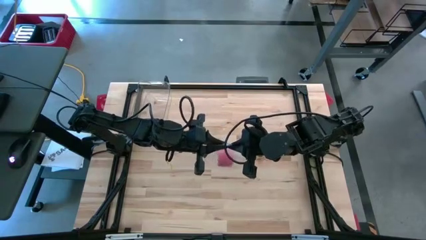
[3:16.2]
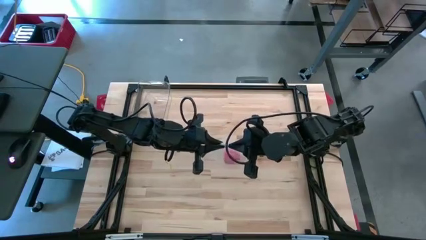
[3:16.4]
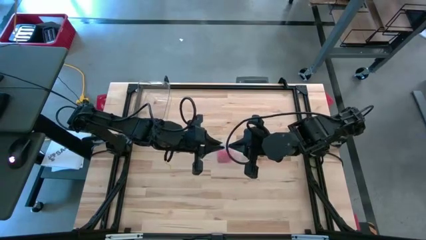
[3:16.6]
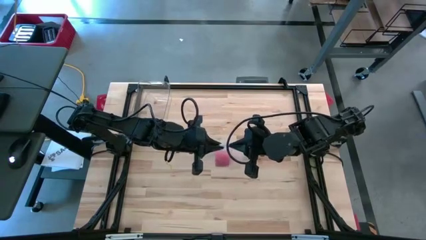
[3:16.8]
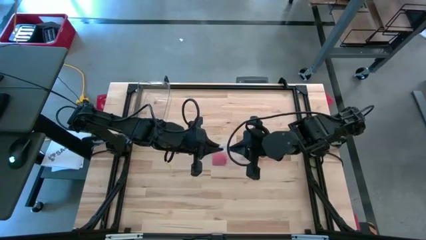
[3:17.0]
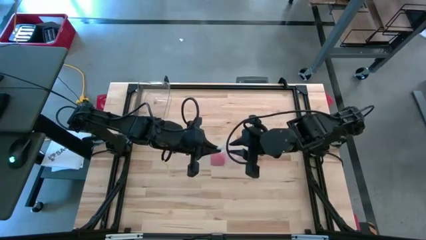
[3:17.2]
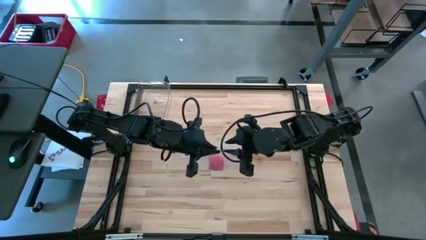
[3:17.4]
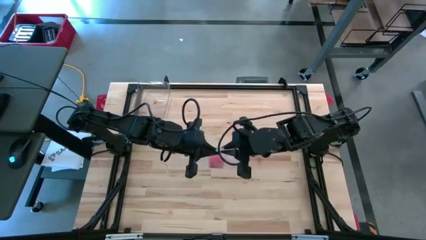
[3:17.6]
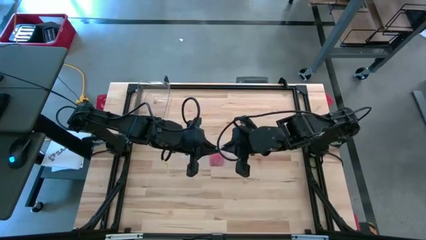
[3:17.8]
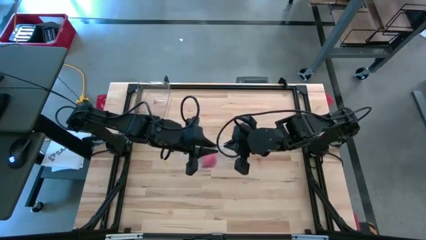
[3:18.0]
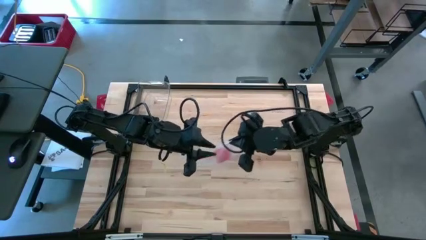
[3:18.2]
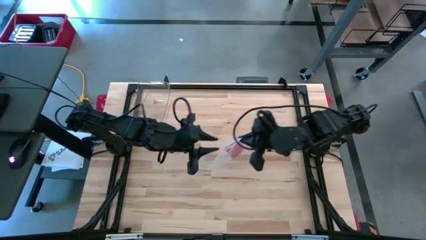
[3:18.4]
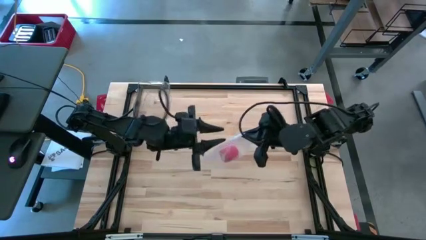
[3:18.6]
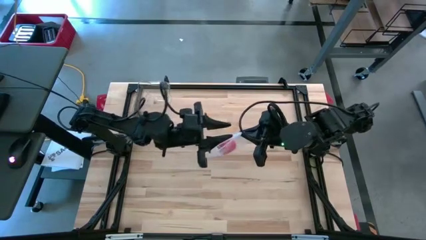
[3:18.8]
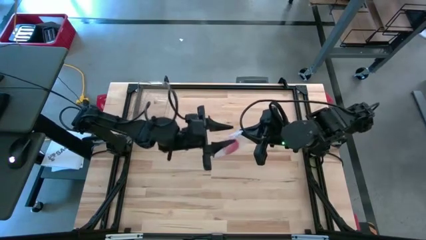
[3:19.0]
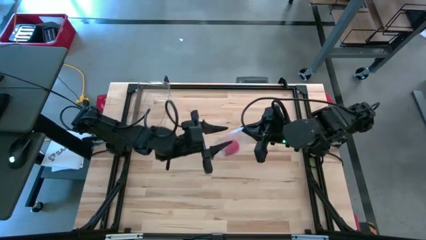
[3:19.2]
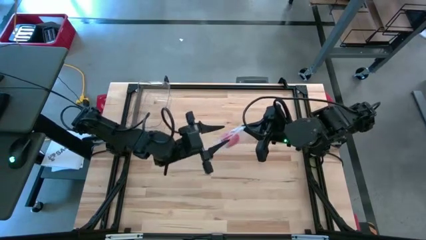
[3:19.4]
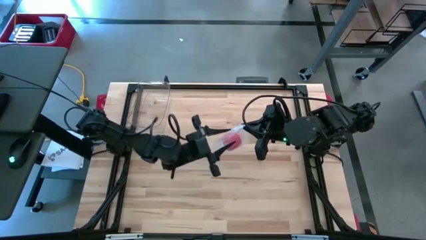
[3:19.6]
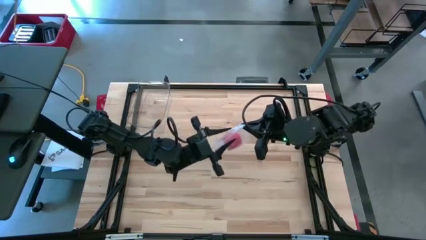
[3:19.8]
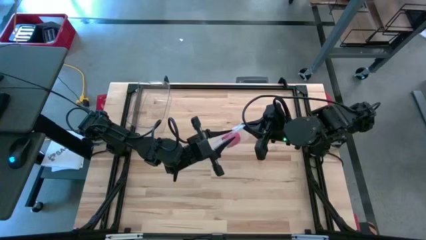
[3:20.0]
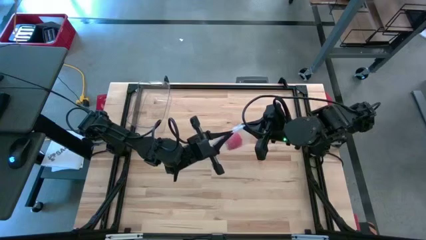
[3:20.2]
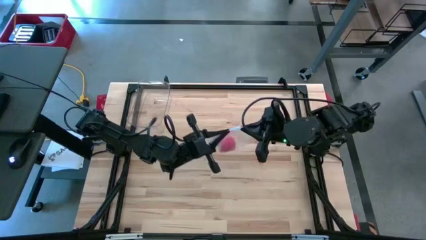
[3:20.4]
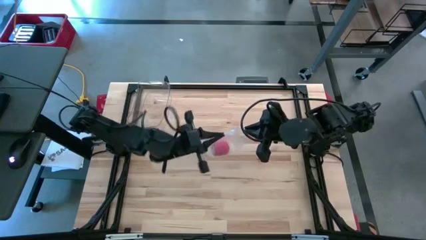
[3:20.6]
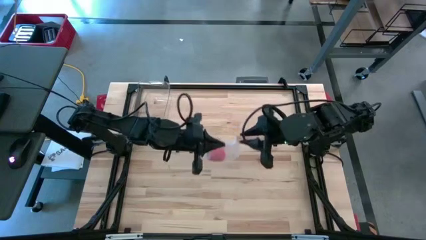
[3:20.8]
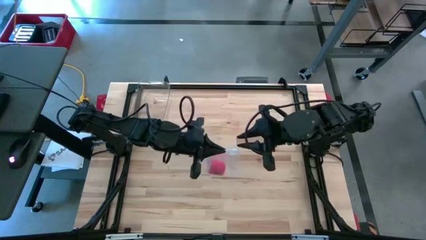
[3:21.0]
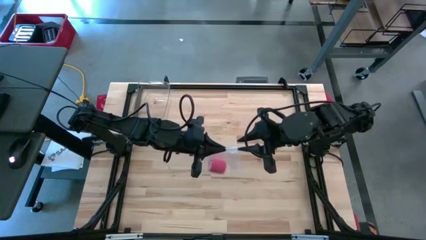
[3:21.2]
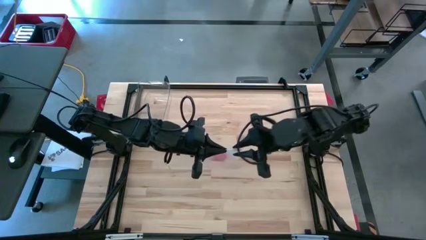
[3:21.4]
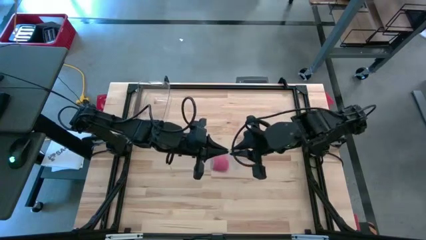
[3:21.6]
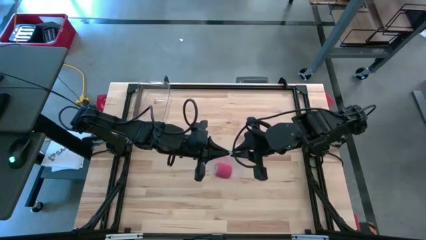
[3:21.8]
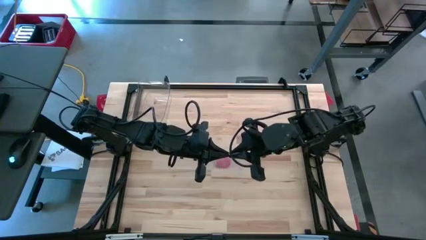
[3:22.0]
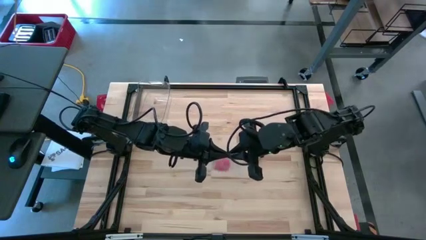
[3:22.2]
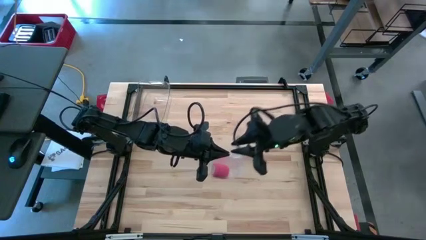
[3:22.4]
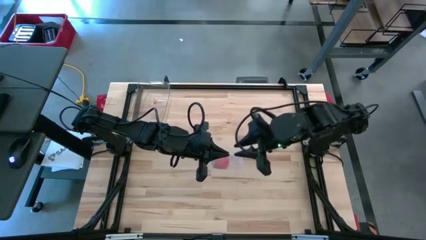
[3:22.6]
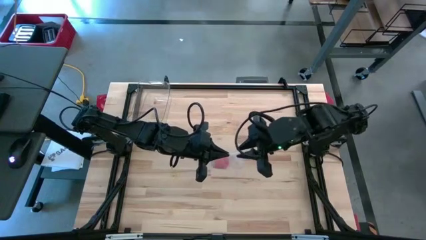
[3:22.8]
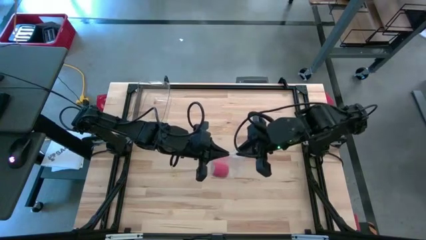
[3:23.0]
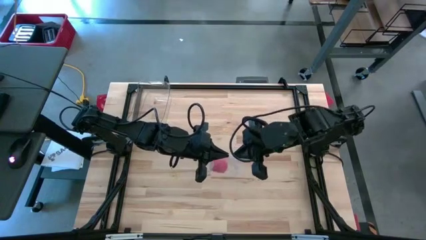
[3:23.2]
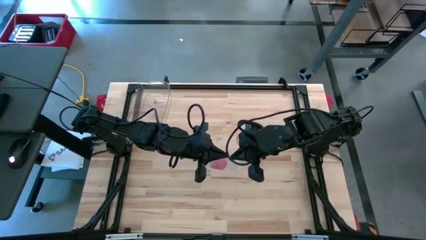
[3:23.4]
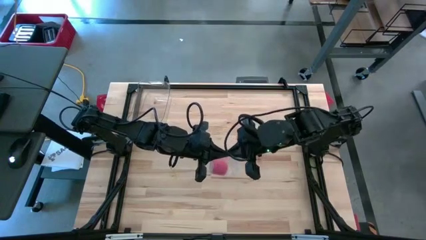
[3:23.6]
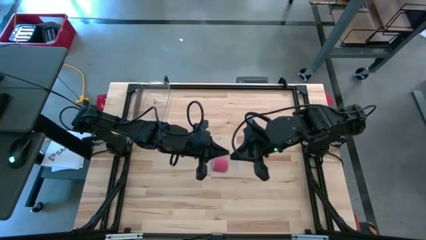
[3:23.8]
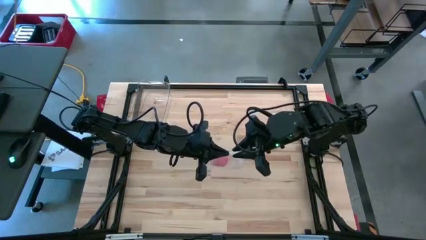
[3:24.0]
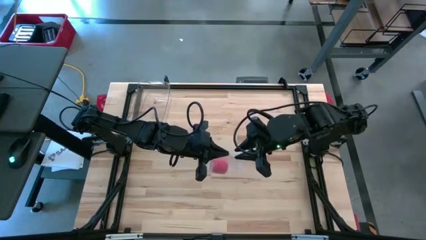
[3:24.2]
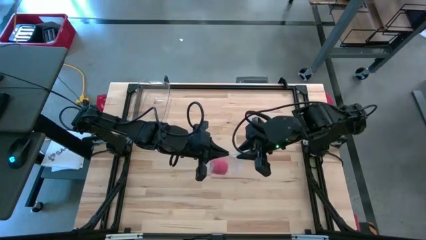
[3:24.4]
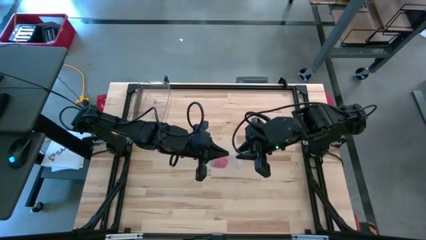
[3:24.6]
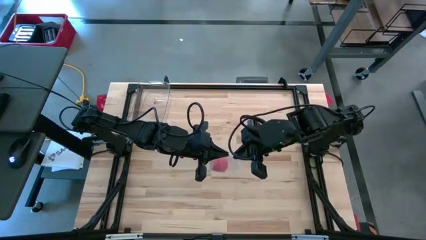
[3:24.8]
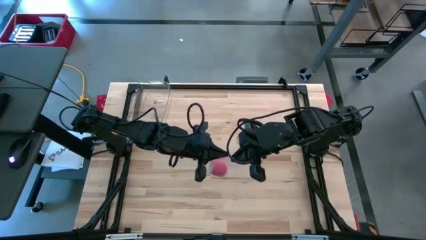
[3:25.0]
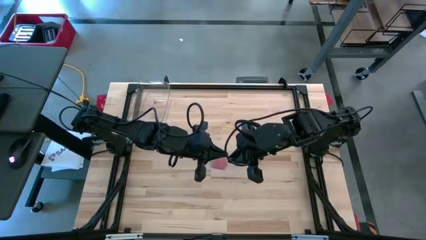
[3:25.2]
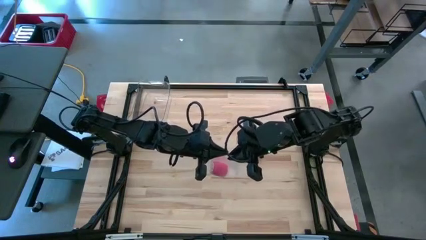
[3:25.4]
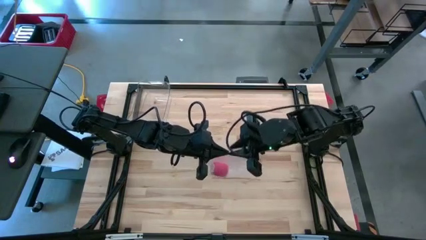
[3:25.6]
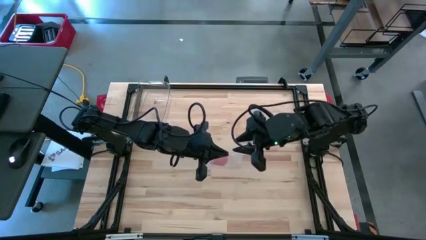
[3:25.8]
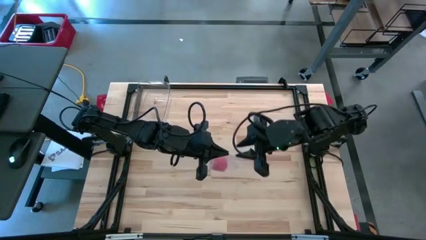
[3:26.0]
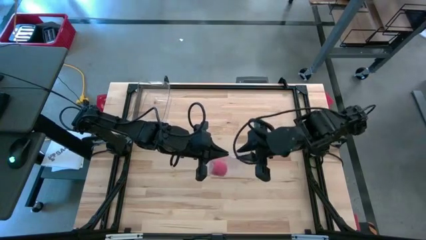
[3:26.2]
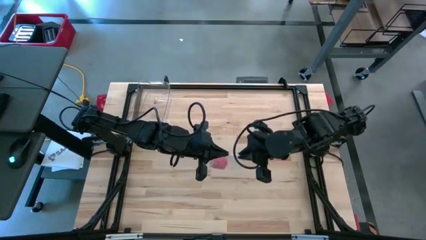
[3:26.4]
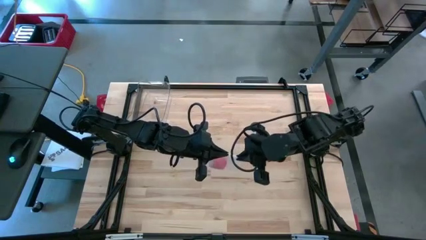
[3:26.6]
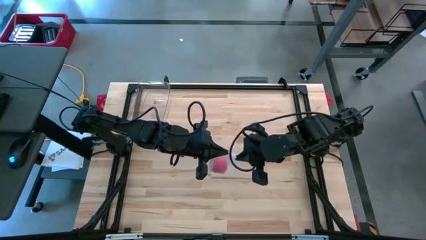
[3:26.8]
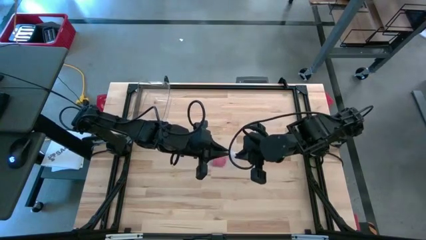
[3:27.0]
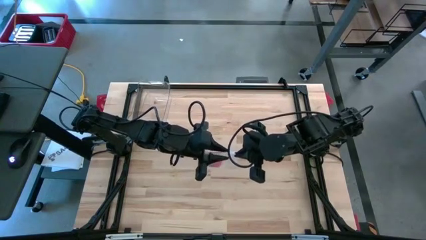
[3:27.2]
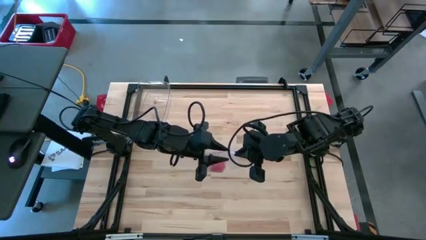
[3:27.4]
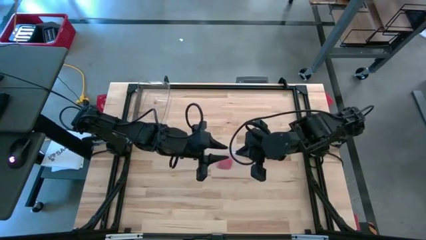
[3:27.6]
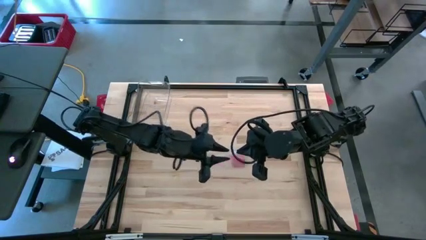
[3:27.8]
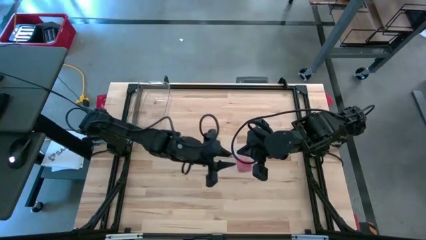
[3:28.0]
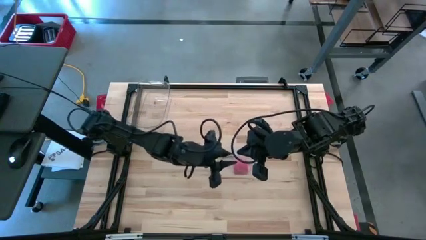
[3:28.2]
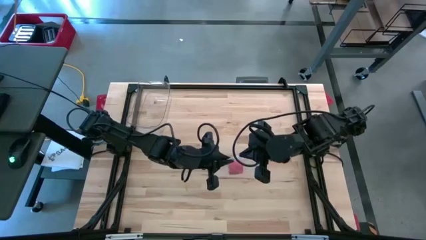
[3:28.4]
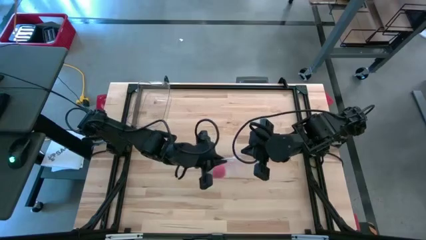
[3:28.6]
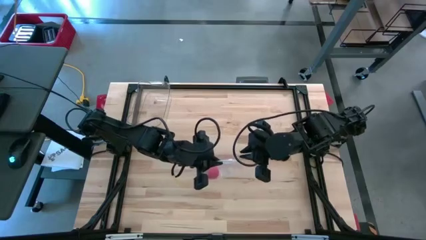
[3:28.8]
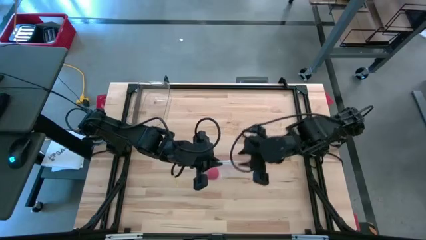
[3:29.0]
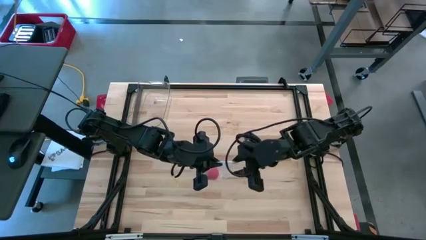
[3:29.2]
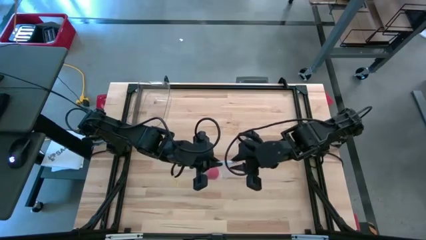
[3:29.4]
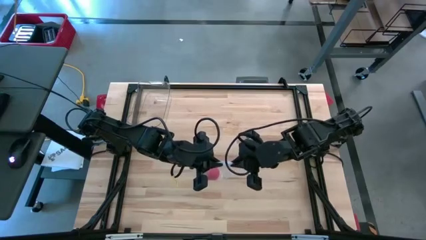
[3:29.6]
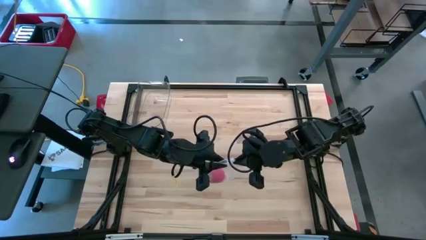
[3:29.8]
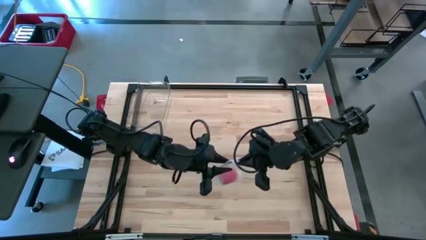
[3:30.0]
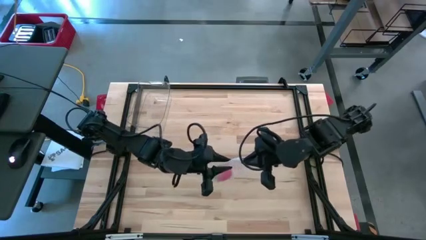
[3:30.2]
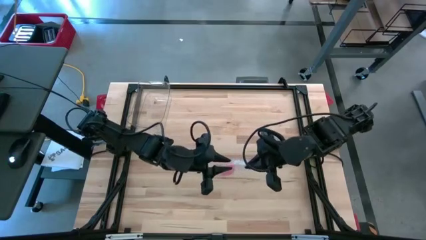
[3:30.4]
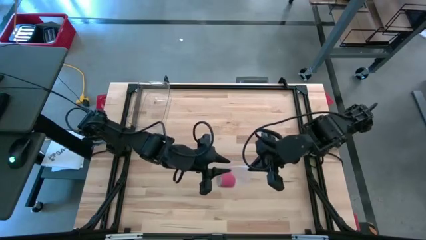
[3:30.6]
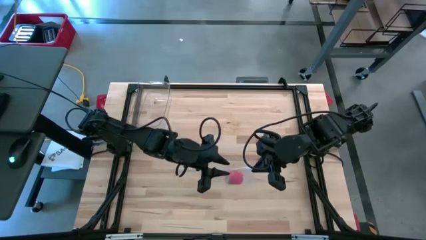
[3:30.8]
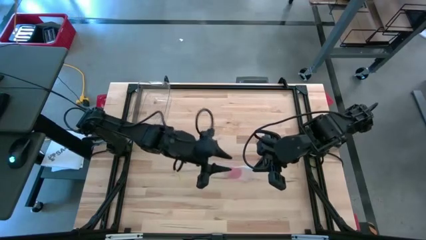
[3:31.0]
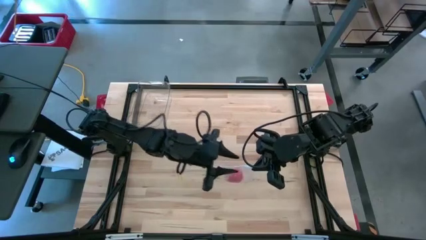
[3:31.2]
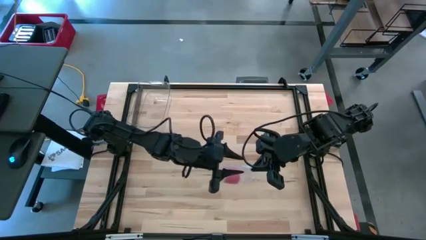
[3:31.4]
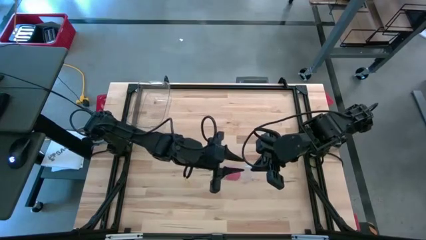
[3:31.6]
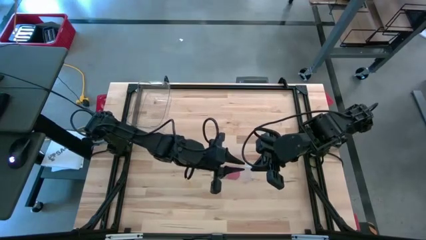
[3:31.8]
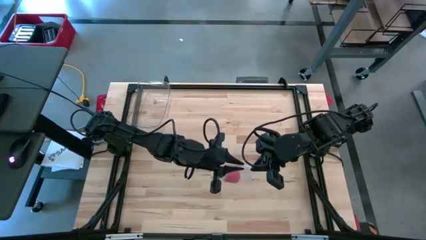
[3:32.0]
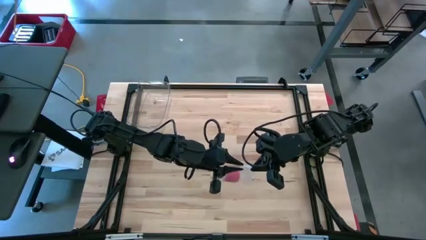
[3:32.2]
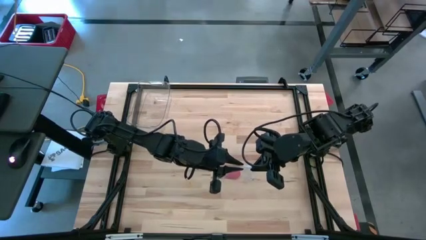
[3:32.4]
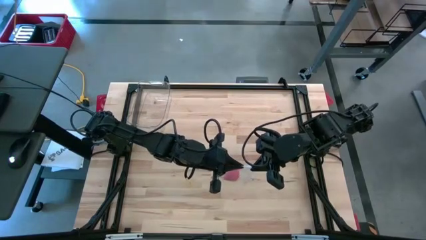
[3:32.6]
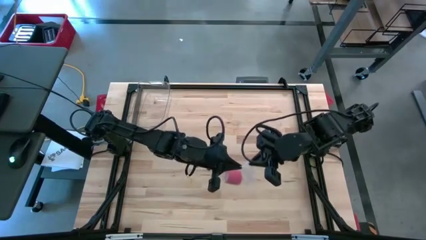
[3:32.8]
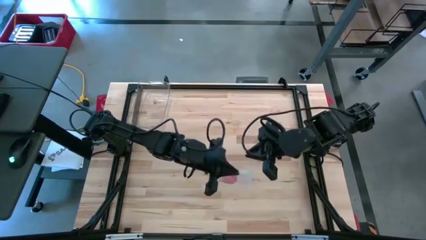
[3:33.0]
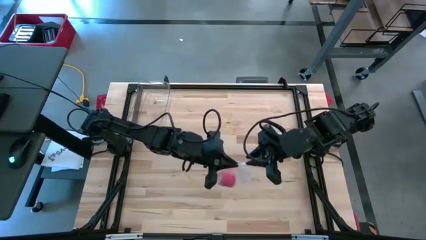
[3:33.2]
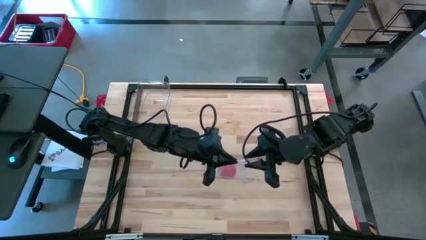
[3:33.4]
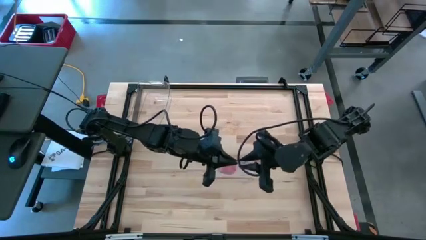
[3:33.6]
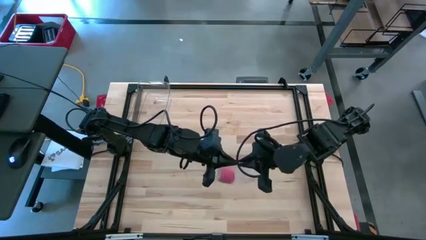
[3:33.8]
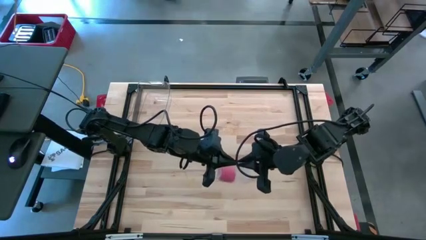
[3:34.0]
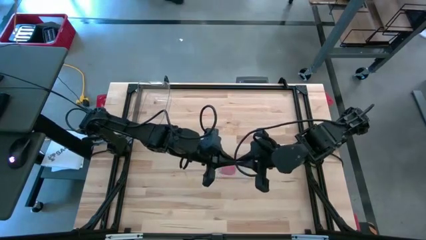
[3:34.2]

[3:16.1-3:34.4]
Task: Roll bandage
Close the transparent zip bag
